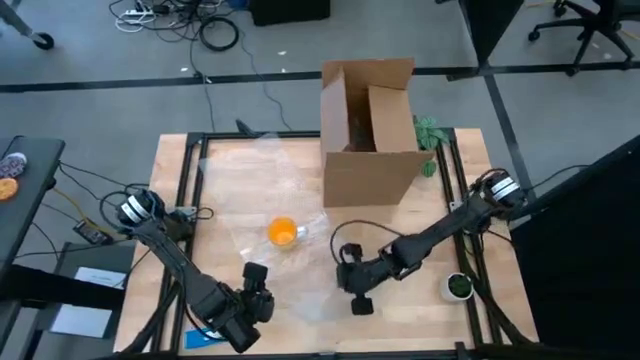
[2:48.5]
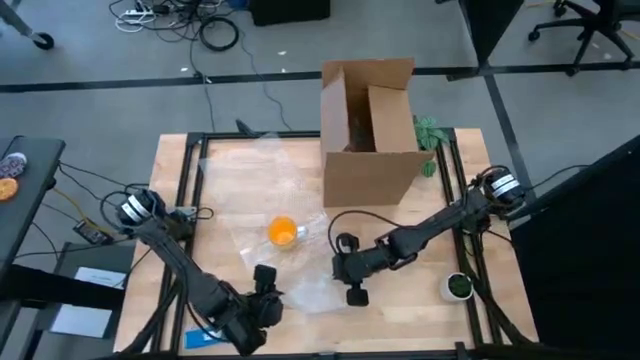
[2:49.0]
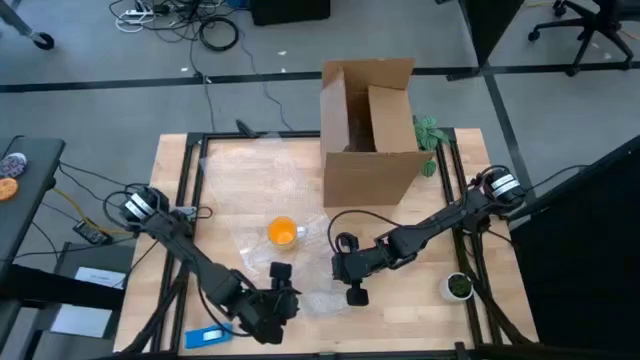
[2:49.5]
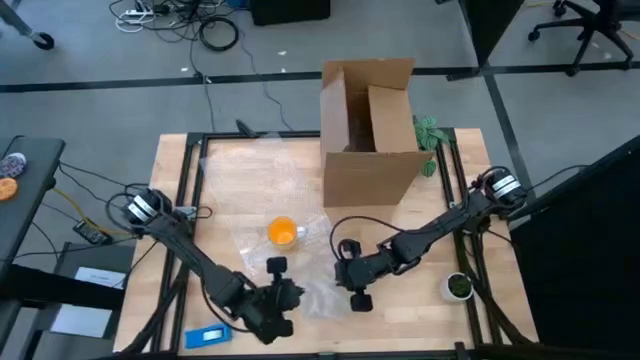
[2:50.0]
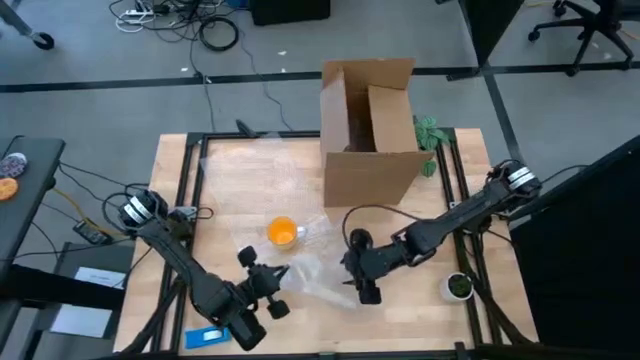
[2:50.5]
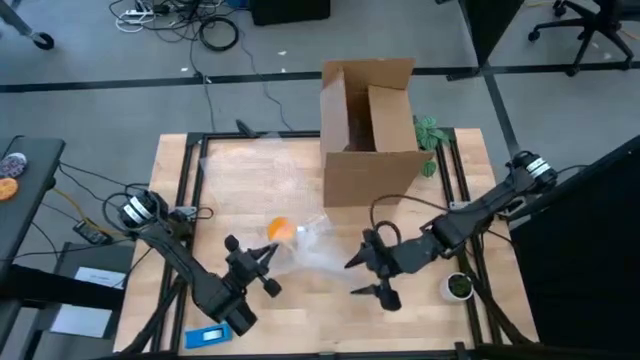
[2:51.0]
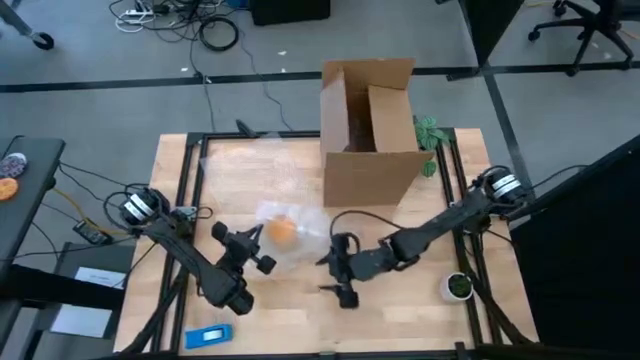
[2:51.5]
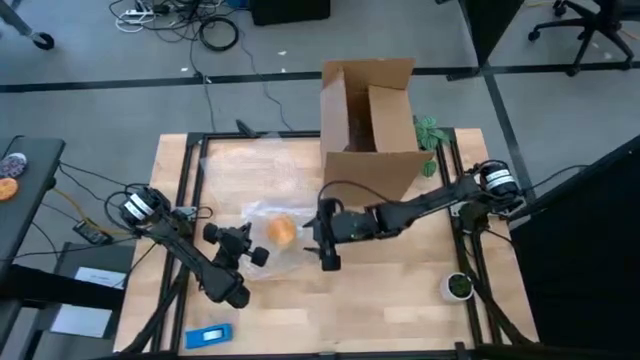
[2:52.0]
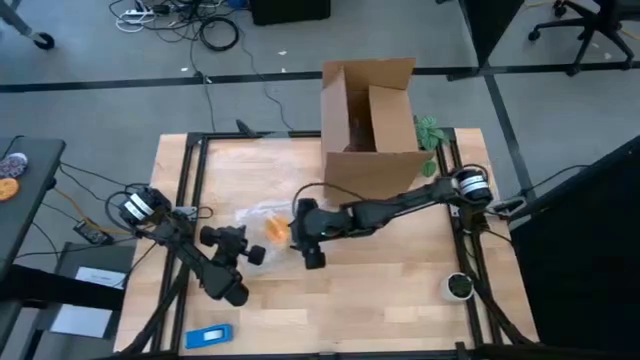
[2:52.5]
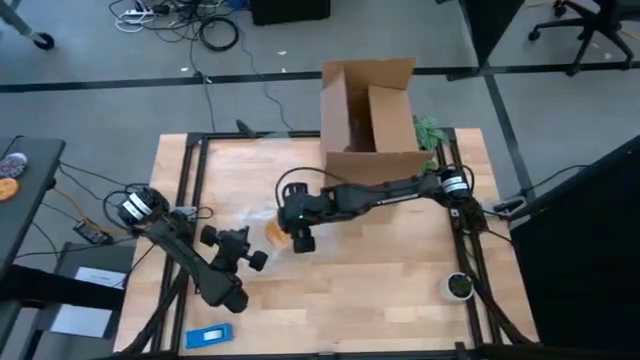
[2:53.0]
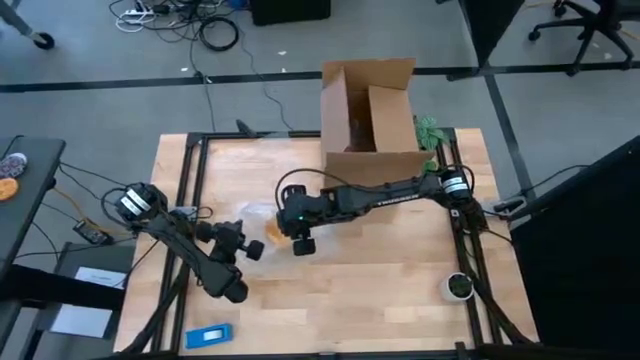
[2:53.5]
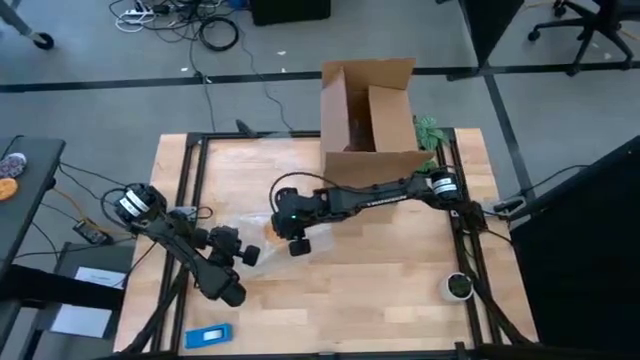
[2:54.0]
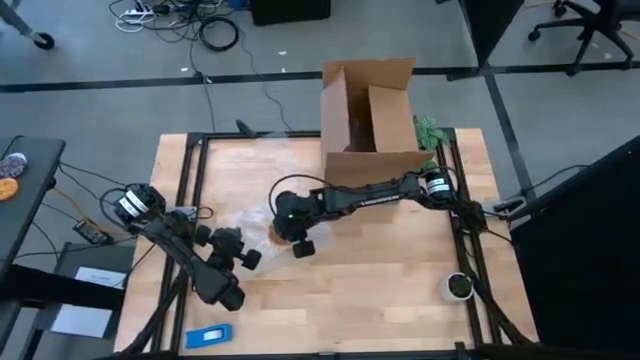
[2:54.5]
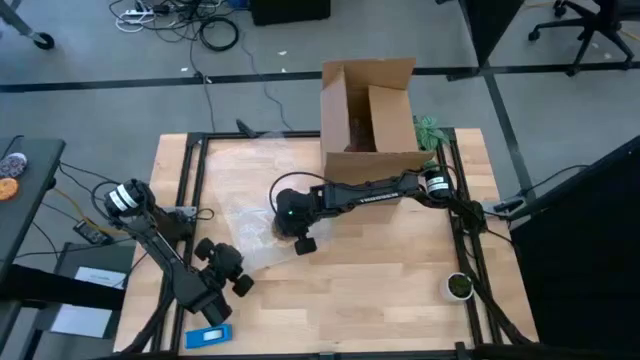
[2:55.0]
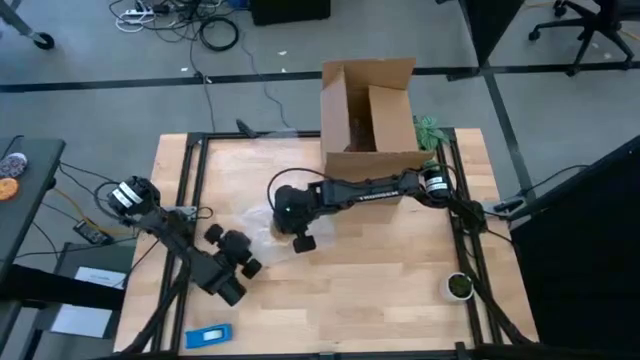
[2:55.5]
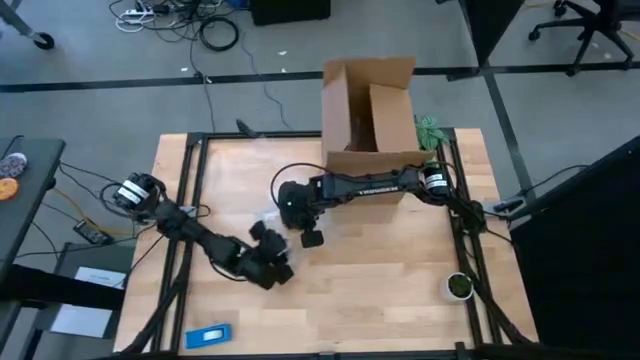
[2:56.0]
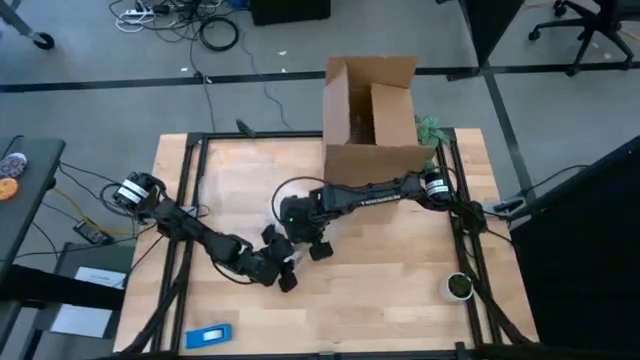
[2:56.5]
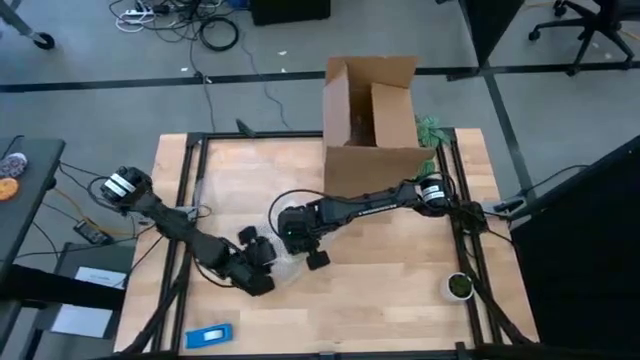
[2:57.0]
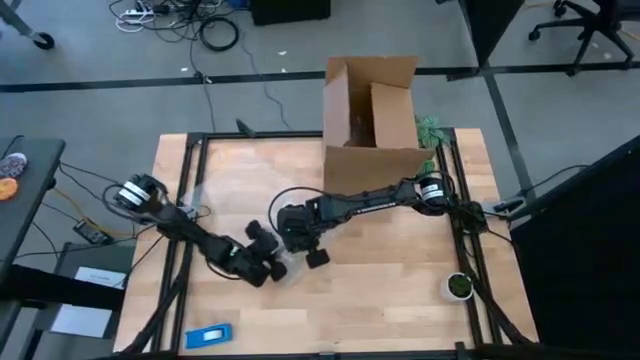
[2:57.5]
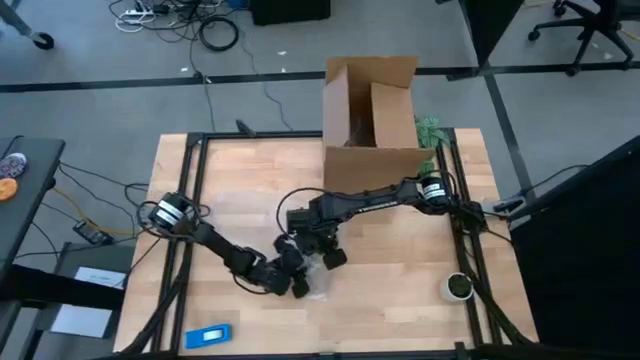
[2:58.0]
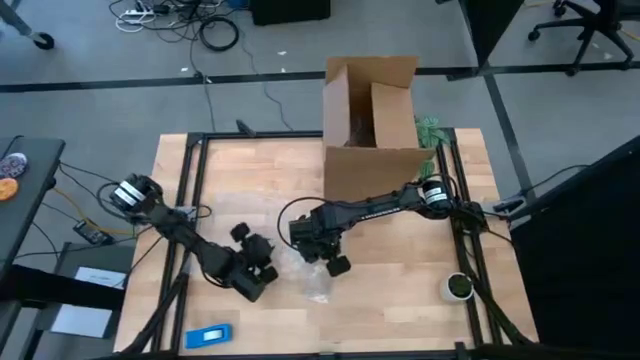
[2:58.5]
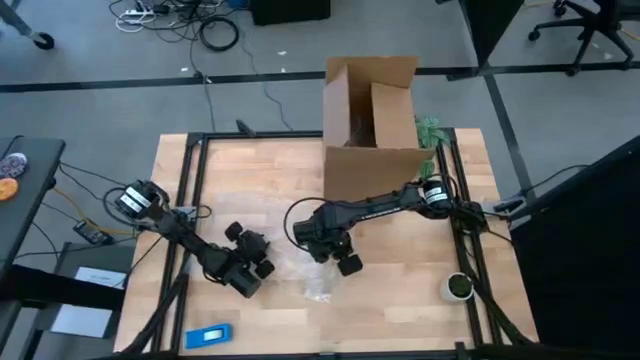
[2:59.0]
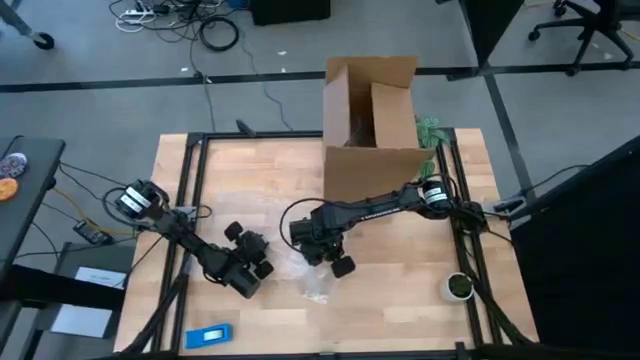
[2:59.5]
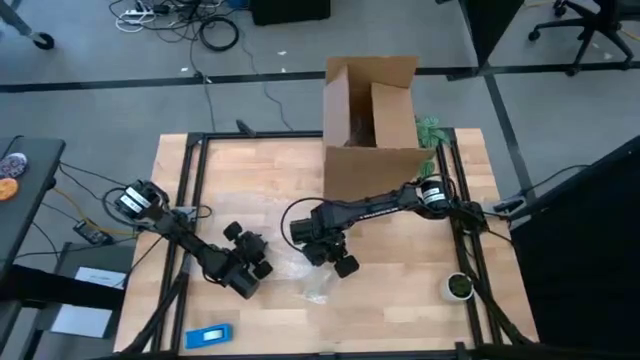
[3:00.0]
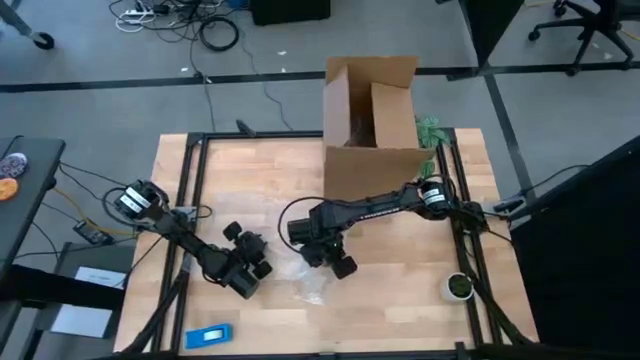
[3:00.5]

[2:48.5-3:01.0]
Task: wrap mug
Wrap the yellow mug with transparent bubble wrap

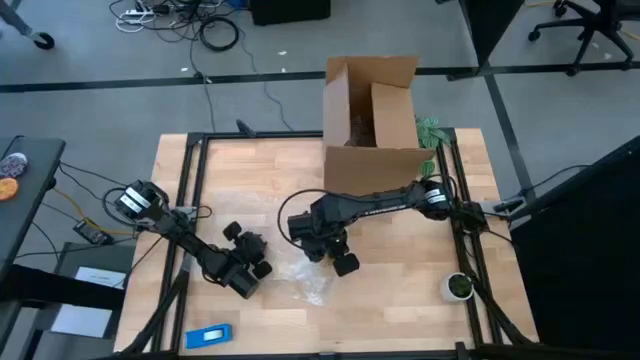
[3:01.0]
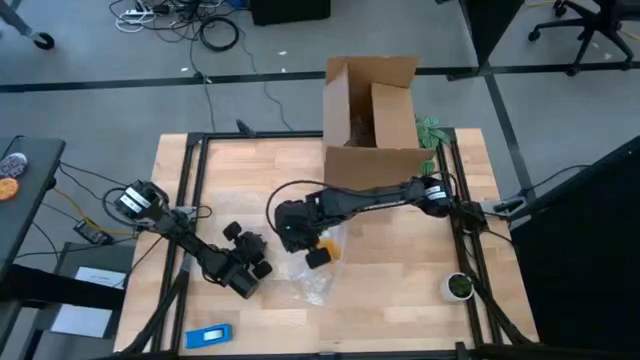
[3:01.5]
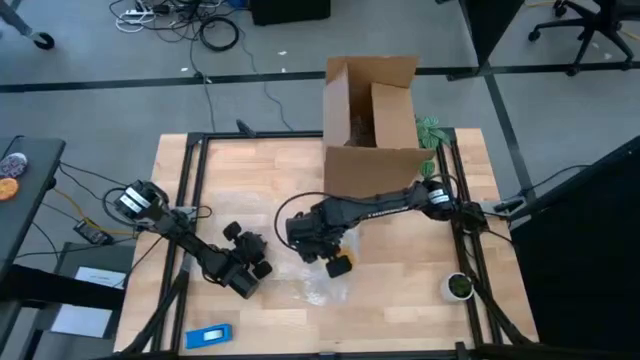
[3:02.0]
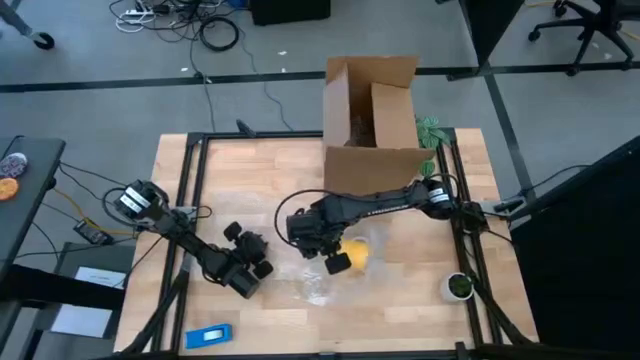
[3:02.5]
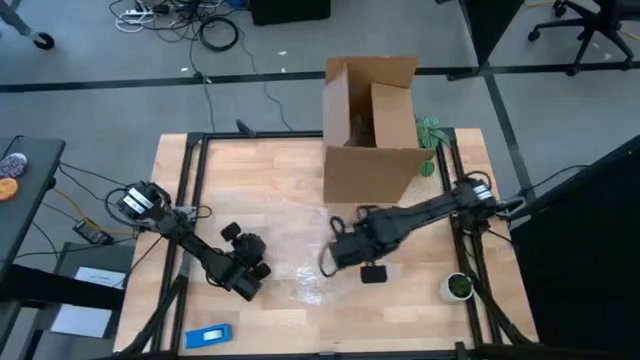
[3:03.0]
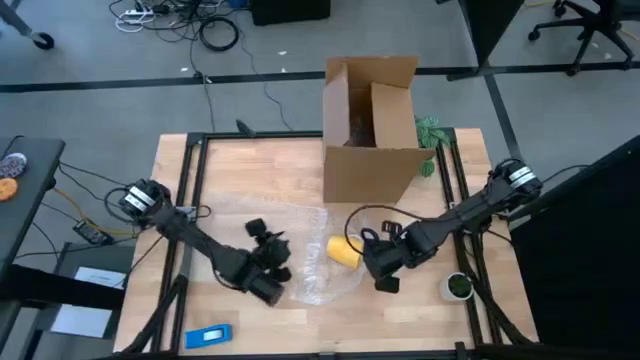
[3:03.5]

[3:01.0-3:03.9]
Wrap the yellow mug with transparent bubble wrap

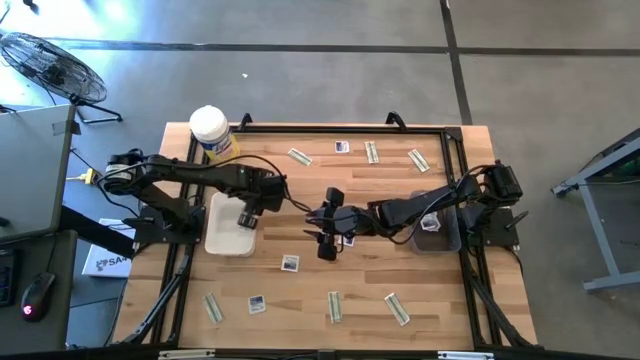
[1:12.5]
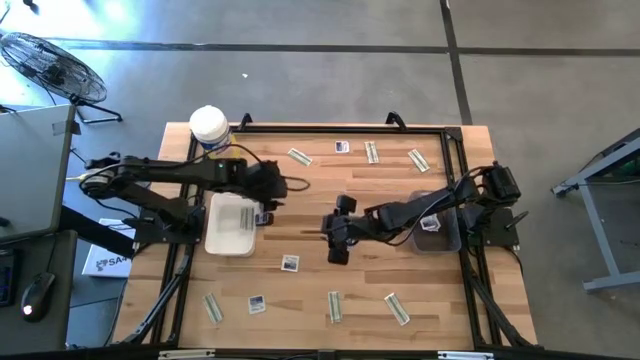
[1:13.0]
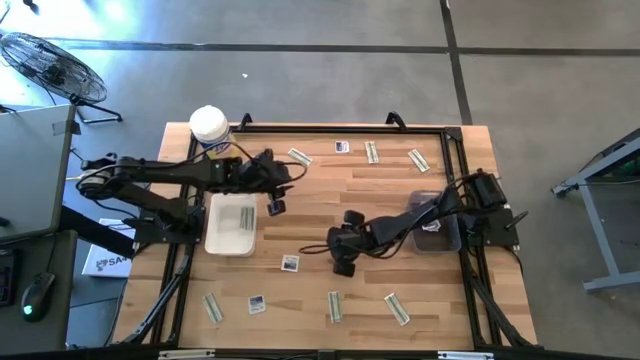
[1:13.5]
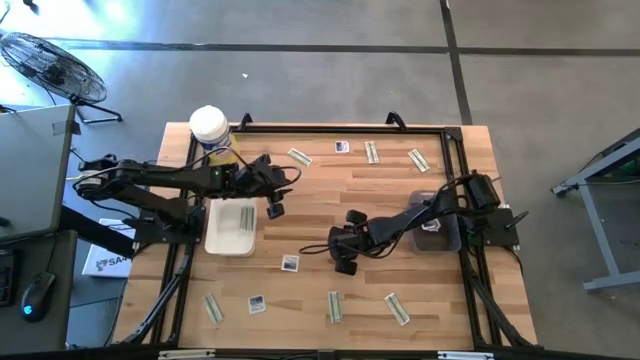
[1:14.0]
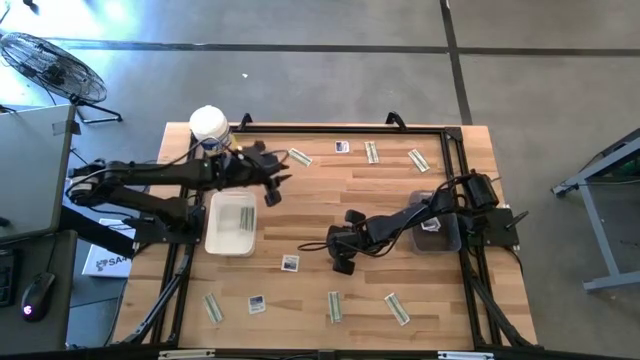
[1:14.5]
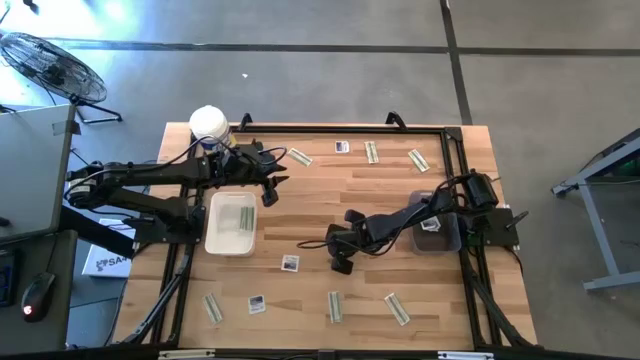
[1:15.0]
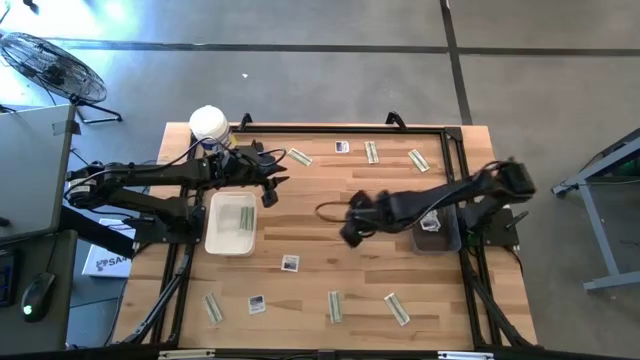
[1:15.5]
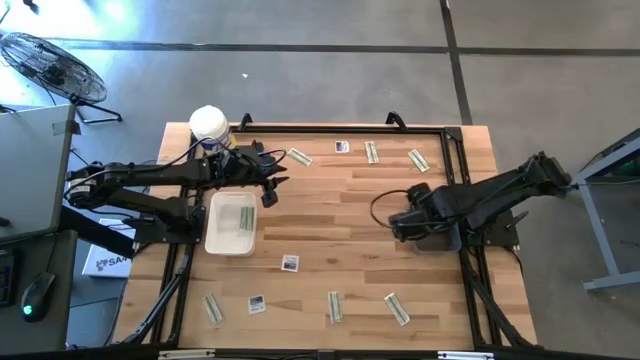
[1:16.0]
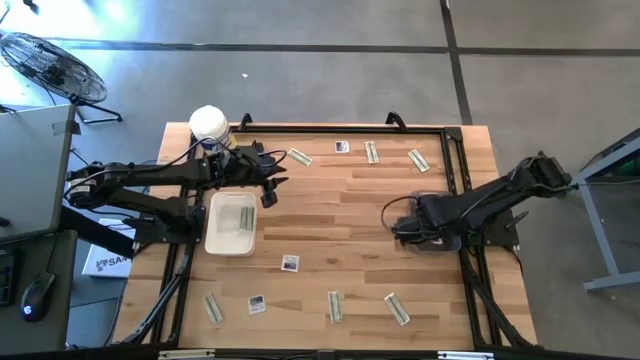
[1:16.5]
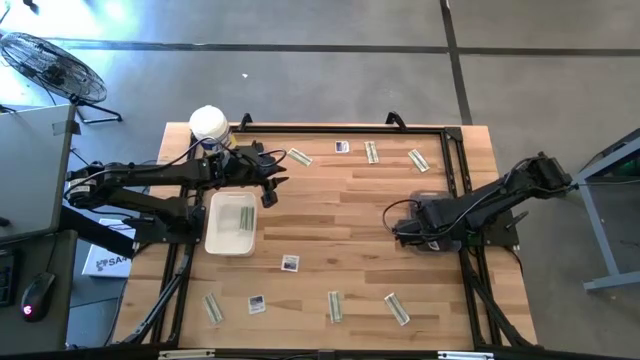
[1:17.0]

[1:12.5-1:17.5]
Task: Pick & Place First Aid Supplies
Put the blue alcohol pad into the black bin
